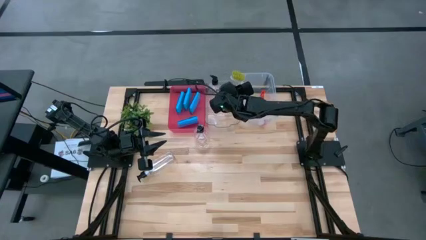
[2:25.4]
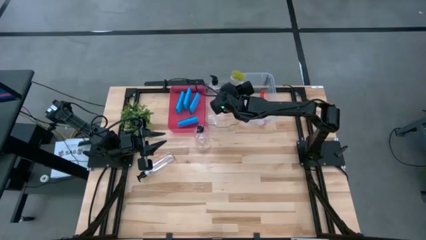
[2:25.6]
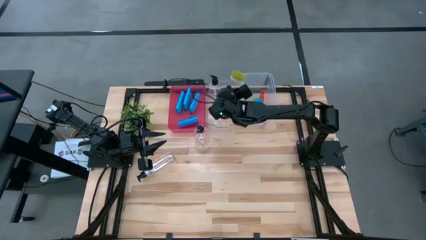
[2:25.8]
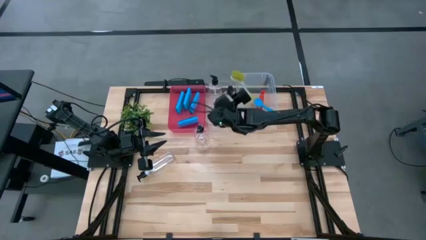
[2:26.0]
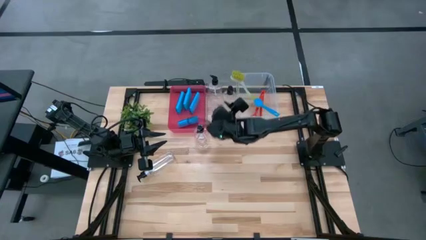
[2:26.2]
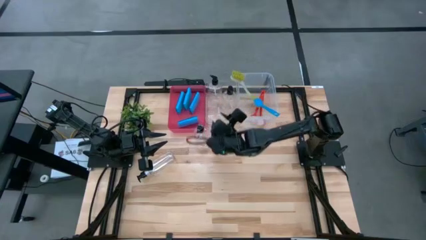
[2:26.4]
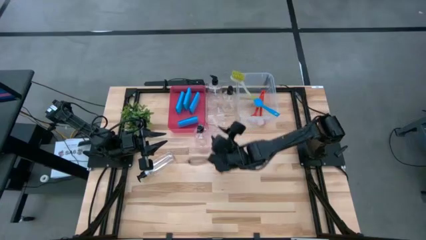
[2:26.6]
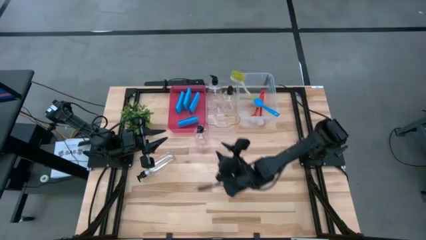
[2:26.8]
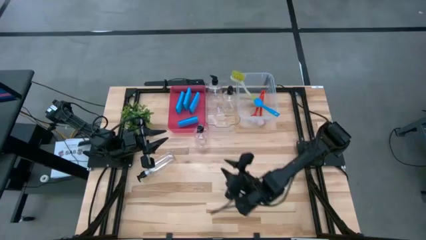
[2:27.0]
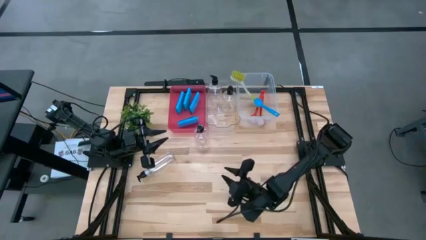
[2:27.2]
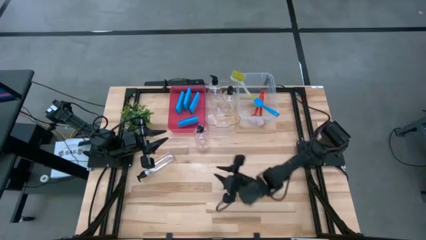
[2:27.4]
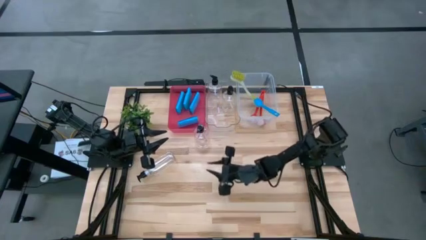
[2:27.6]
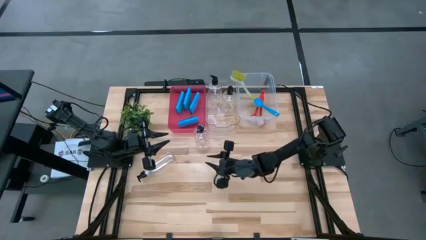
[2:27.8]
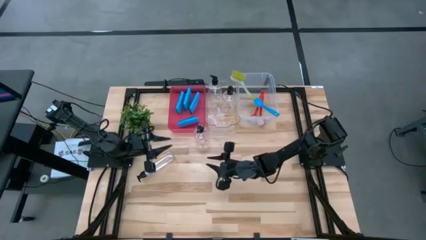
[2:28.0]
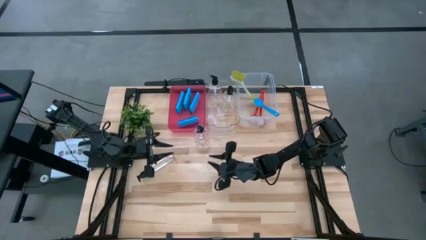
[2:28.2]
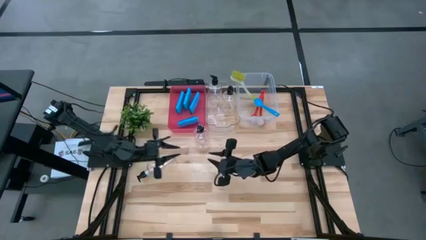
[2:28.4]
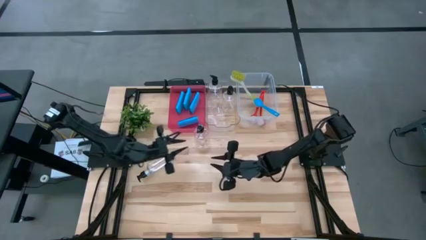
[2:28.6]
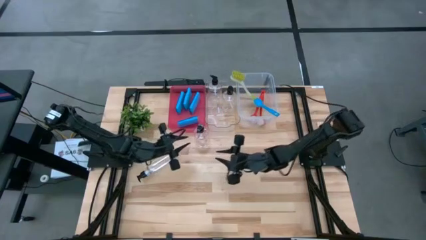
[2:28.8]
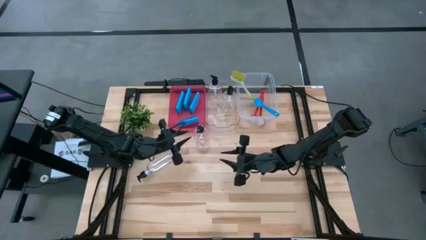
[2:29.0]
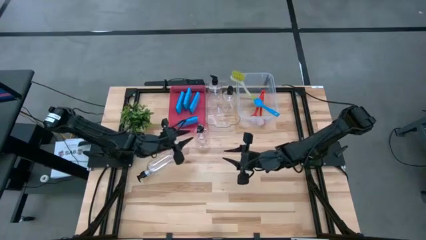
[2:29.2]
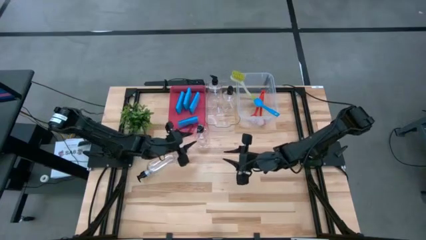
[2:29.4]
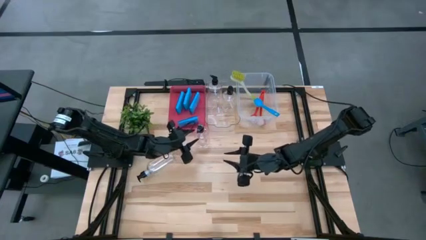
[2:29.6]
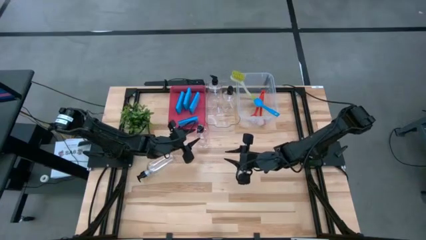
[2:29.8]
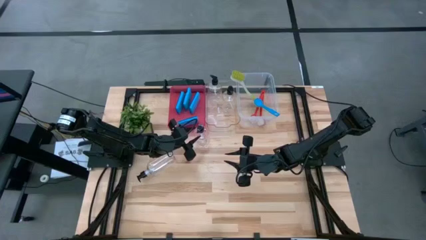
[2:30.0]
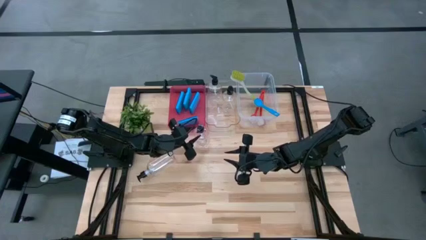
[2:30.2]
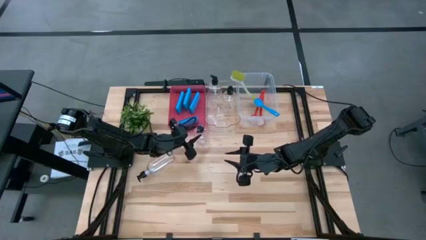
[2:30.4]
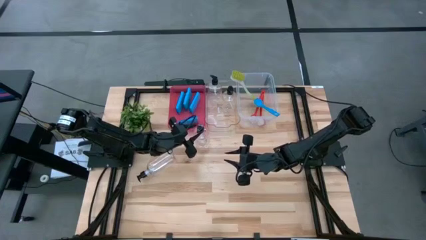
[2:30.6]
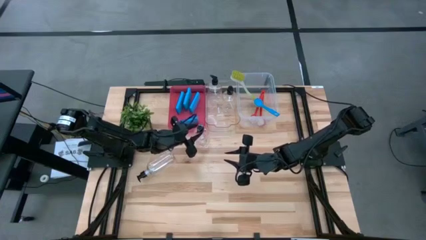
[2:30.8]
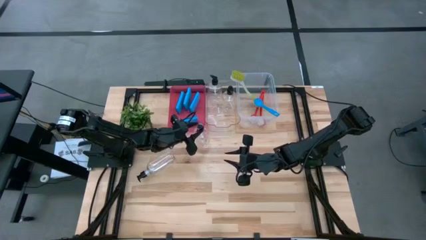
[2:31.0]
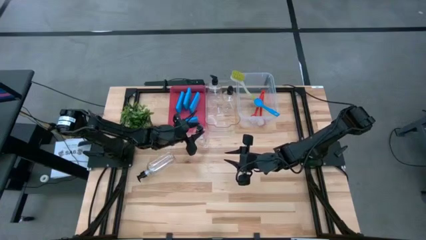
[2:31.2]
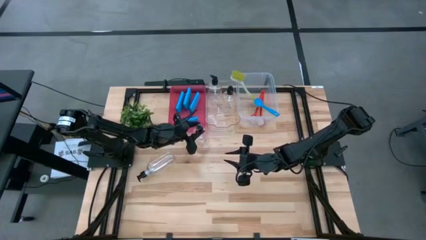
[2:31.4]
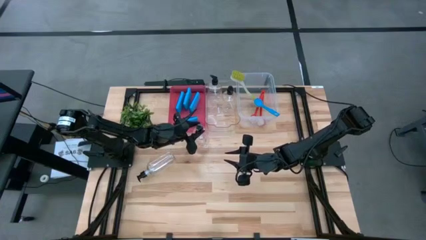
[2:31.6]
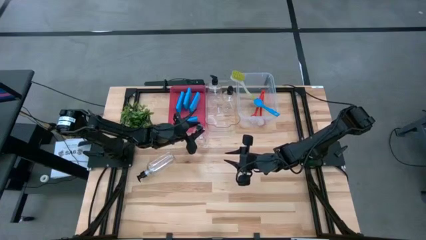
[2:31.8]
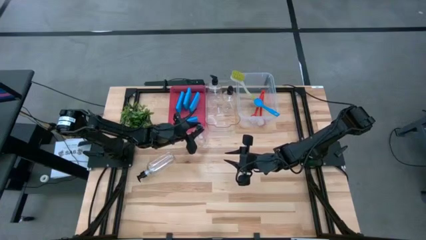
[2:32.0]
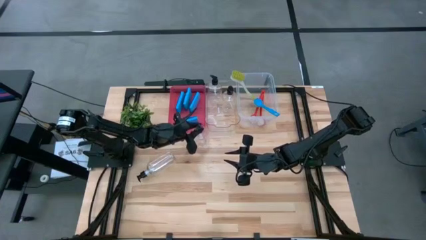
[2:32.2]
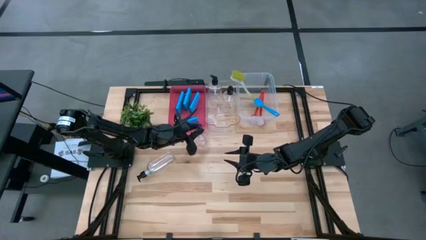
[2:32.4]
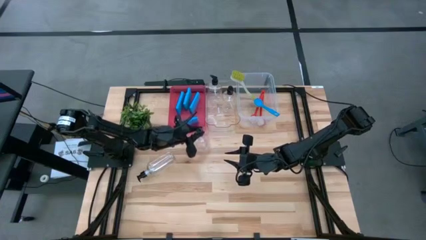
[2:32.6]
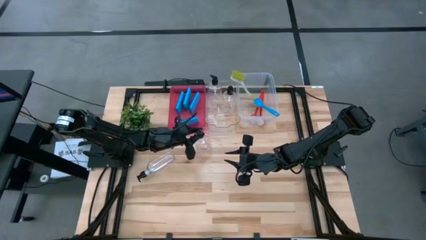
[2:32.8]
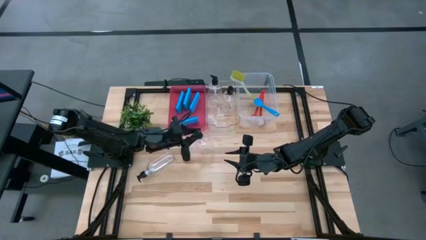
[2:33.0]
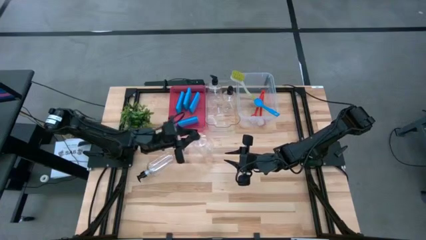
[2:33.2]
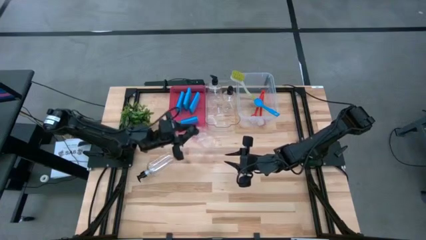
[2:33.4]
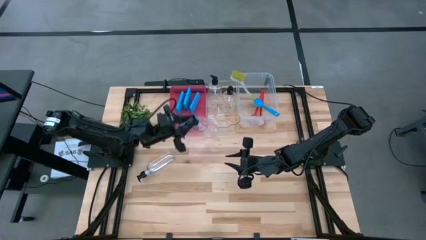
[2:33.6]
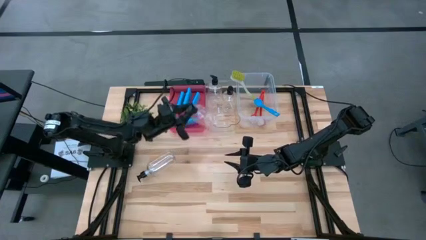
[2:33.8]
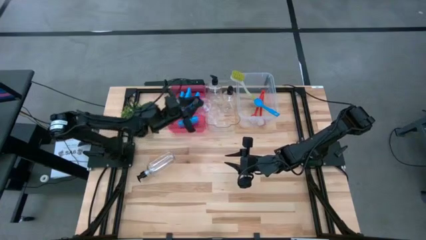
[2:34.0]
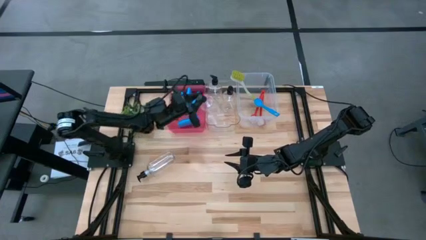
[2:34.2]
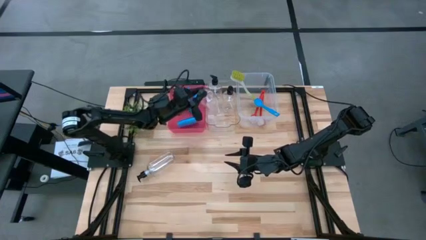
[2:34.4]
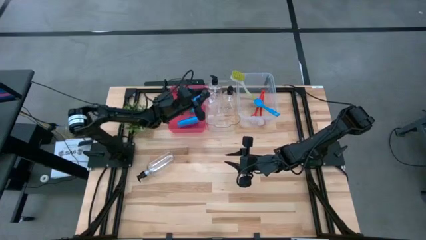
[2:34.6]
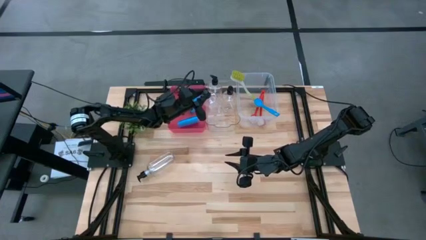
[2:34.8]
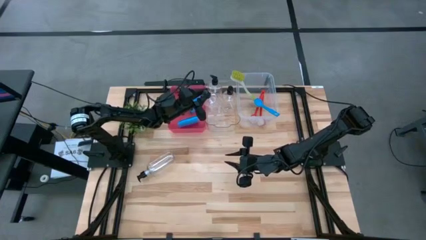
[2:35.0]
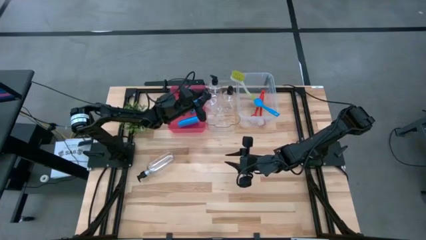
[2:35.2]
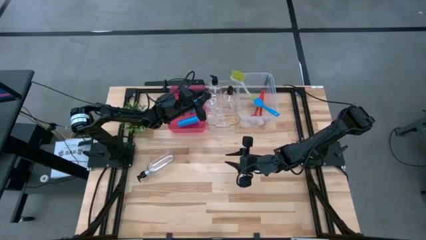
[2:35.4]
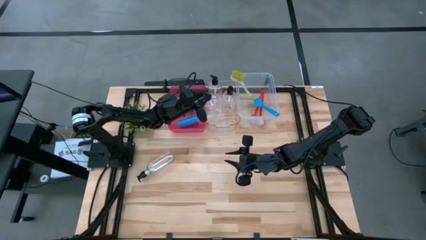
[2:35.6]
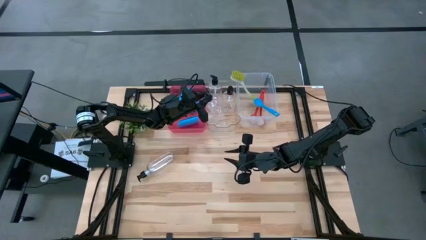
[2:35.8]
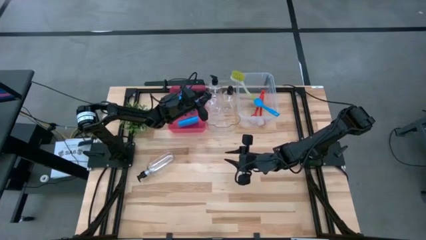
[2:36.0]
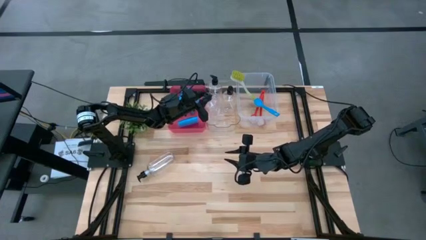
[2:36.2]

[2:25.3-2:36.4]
Task: Pick & Place Kitchen Sink Supplies
Put the spray bottle into the transparent bin

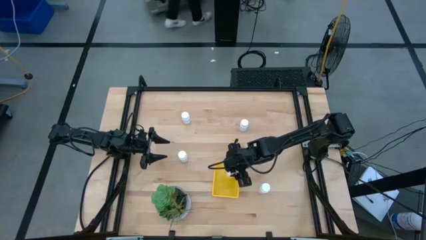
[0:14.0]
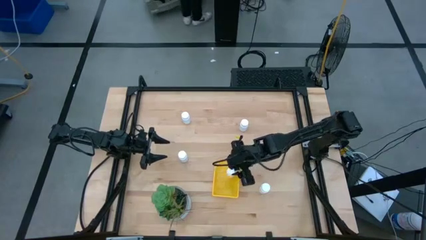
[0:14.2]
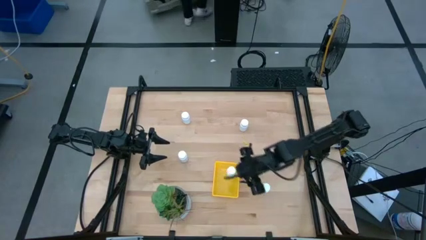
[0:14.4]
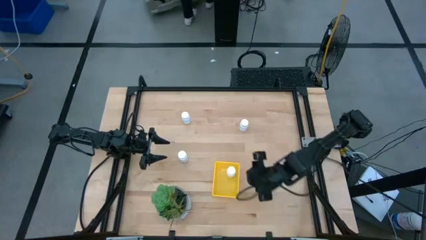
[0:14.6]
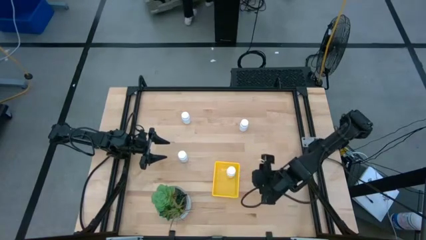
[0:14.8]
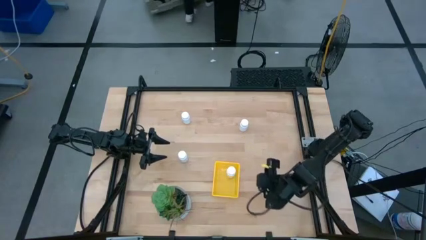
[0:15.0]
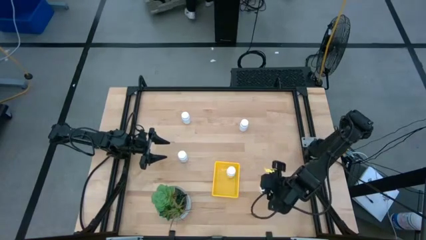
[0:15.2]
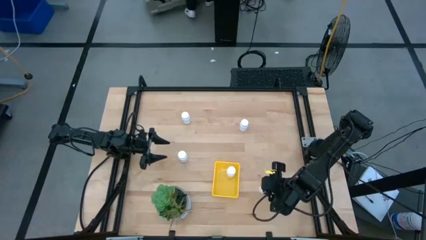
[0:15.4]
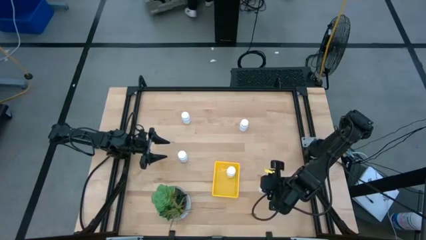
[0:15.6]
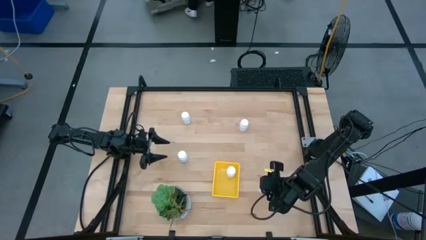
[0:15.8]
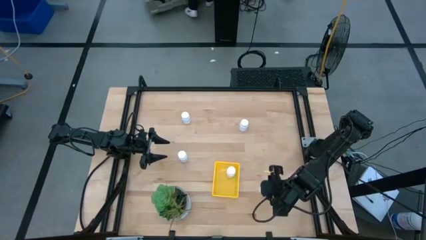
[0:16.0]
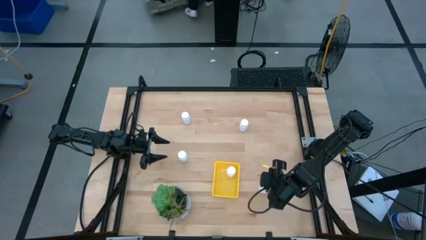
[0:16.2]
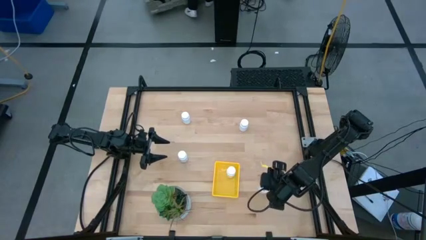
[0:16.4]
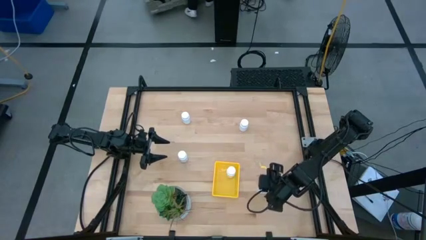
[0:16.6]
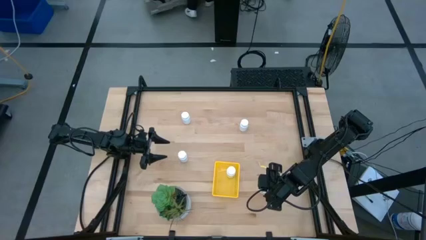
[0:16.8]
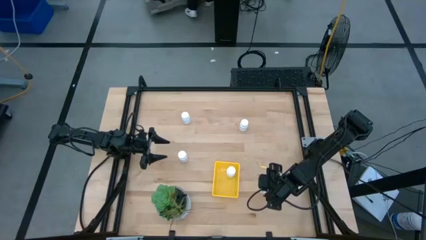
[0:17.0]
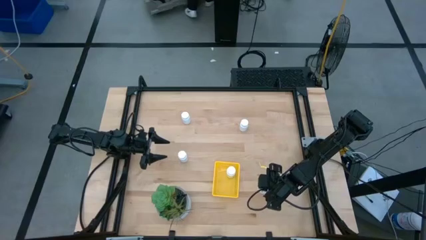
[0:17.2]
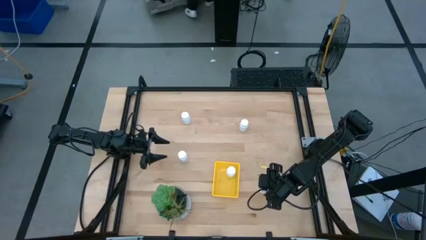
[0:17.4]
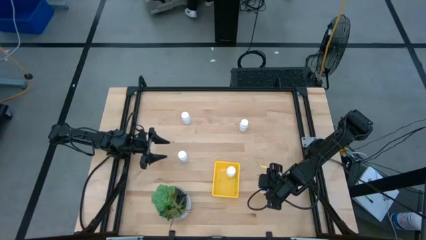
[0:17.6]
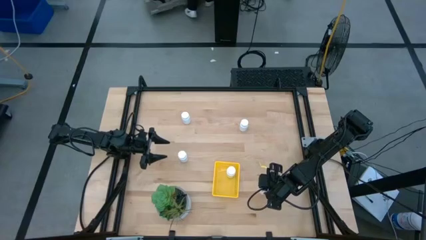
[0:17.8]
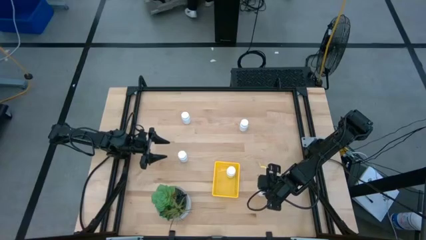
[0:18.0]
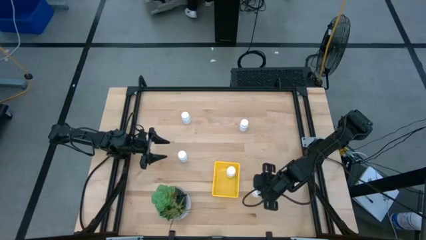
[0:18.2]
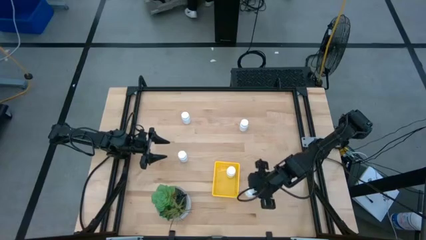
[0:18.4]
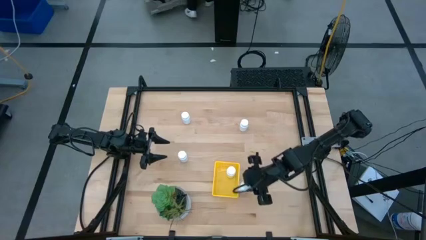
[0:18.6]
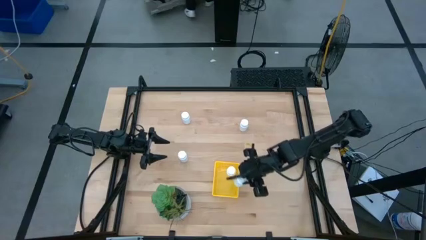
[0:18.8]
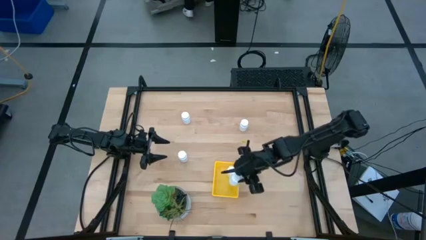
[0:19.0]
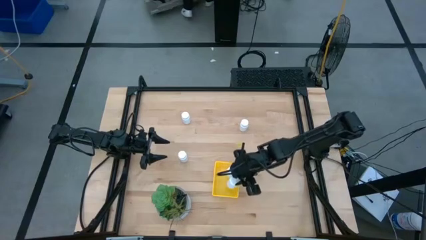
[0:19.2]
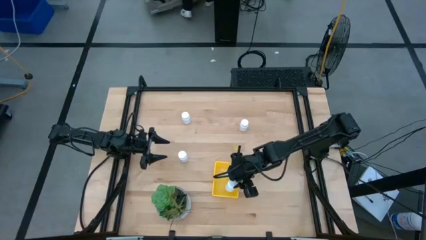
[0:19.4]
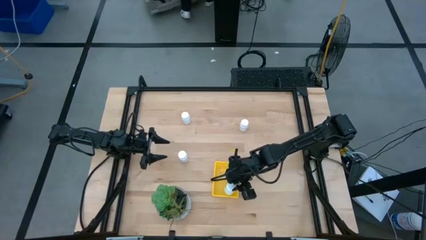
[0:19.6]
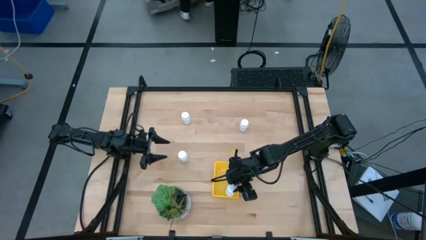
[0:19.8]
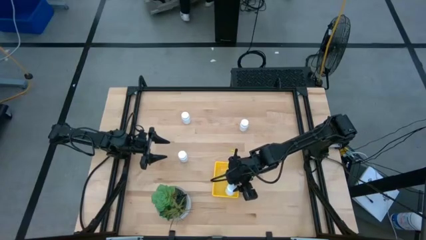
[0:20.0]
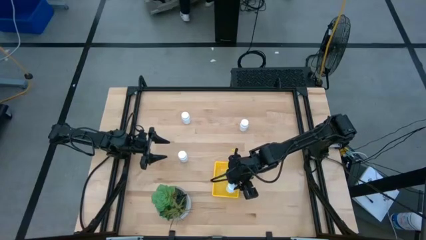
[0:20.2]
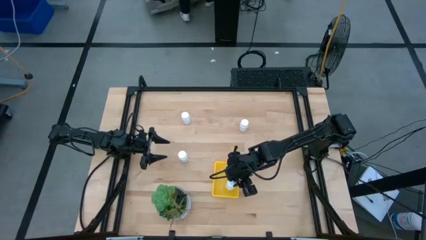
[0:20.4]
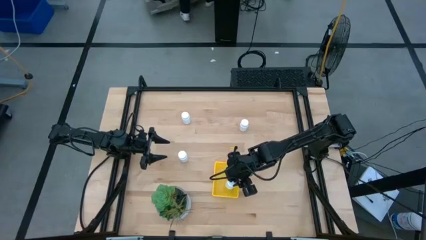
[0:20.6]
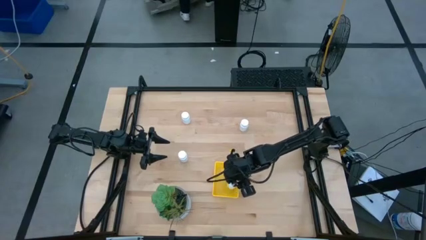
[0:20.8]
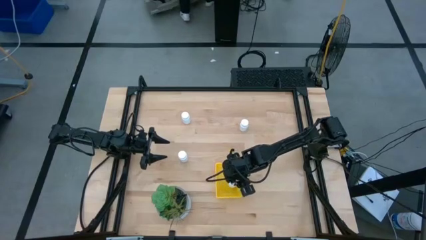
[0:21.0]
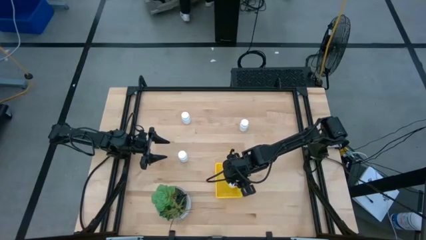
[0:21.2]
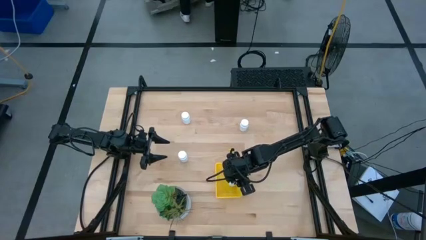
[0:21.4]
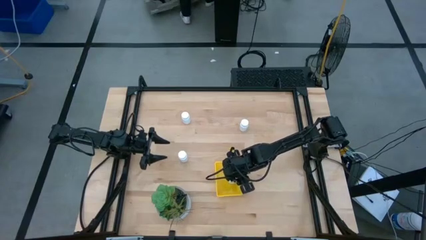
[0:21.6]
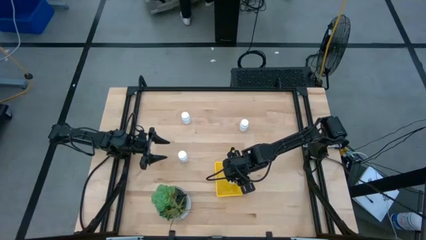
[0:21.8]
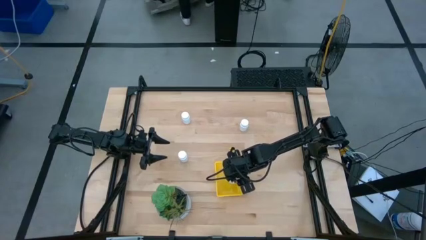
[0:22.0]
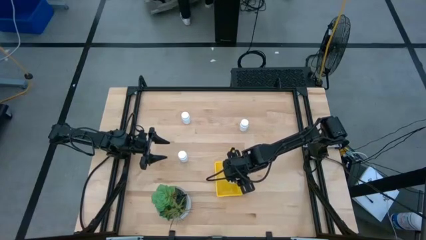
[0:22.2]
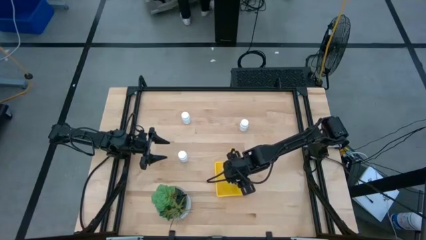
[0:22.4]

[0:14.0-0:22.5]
Task: Pick and place pill bottles into a basket
Put the white pill bottle into the yellow bin
